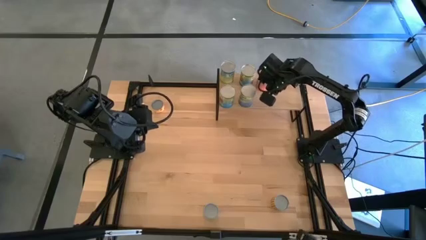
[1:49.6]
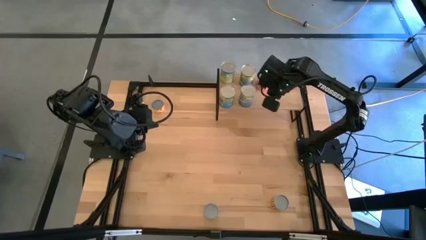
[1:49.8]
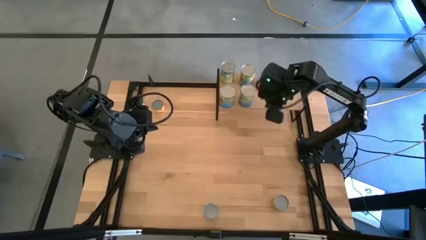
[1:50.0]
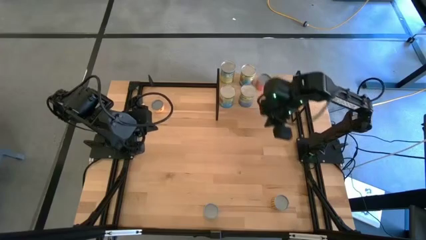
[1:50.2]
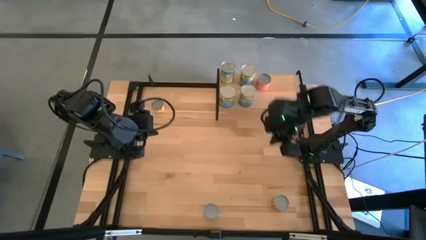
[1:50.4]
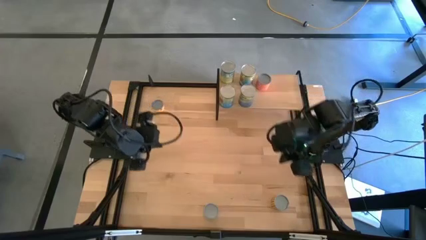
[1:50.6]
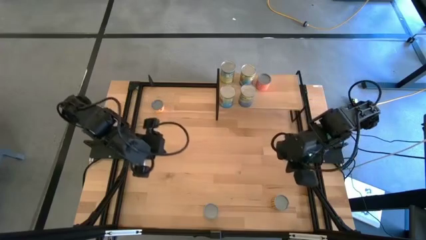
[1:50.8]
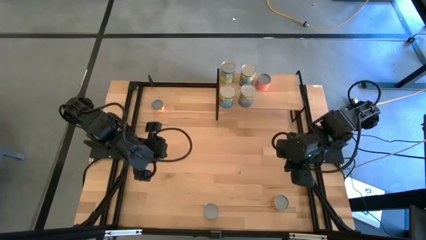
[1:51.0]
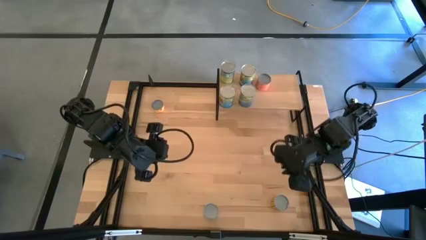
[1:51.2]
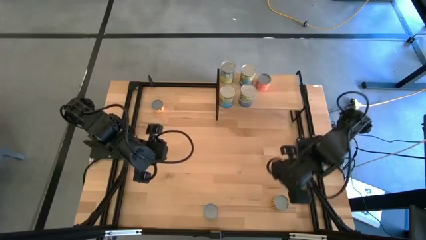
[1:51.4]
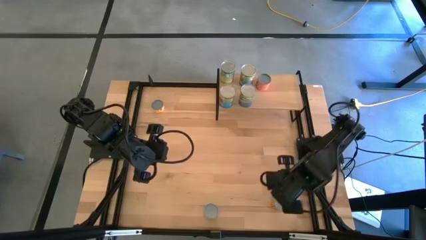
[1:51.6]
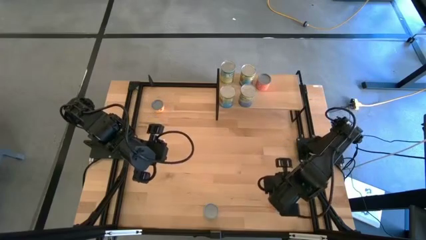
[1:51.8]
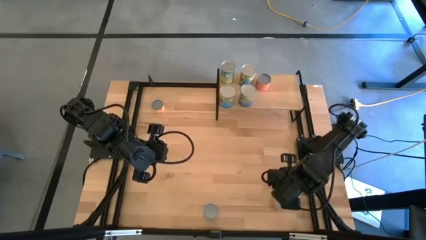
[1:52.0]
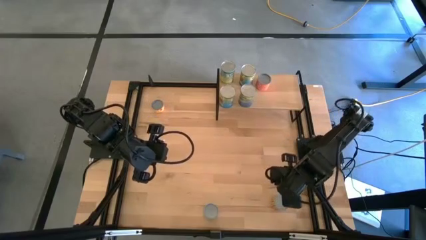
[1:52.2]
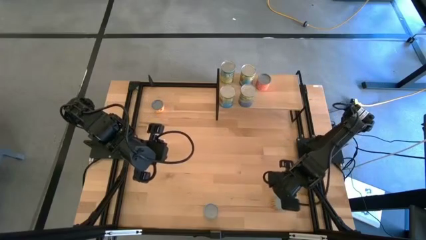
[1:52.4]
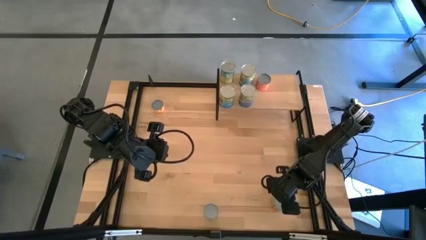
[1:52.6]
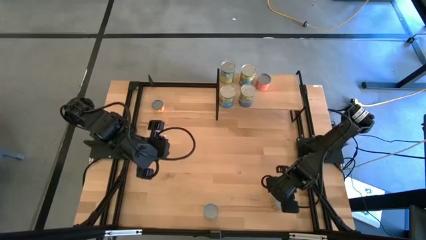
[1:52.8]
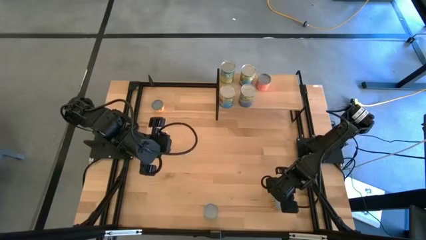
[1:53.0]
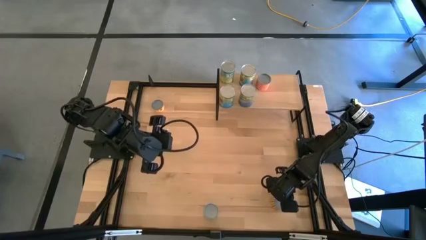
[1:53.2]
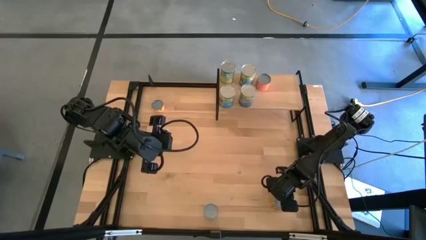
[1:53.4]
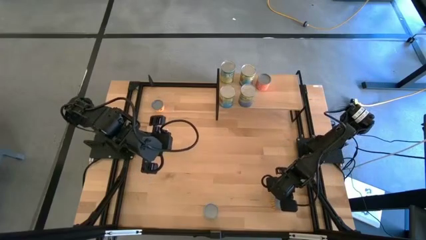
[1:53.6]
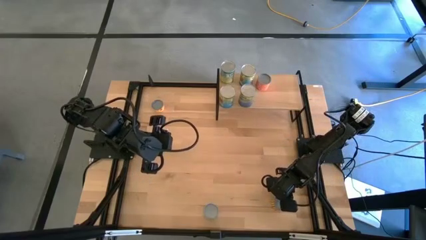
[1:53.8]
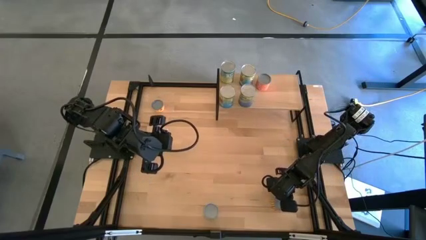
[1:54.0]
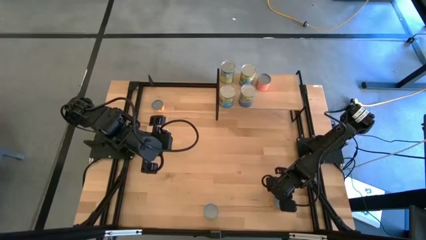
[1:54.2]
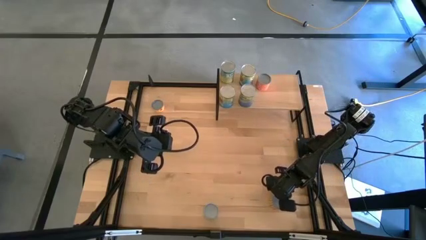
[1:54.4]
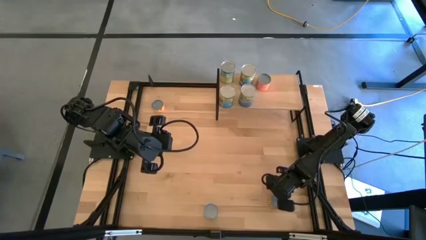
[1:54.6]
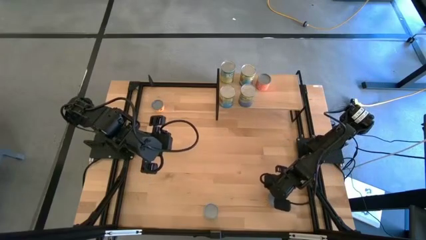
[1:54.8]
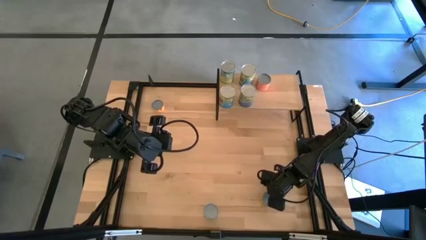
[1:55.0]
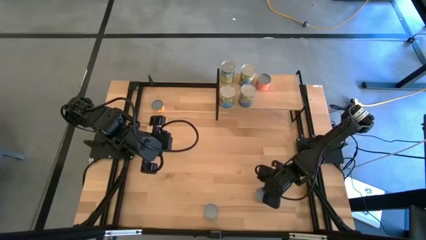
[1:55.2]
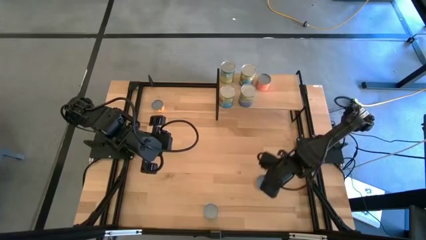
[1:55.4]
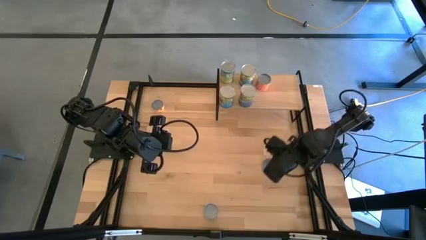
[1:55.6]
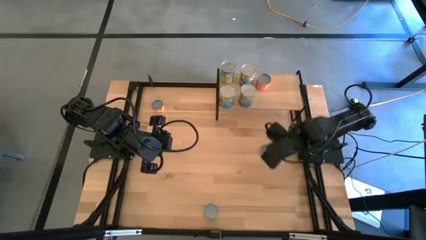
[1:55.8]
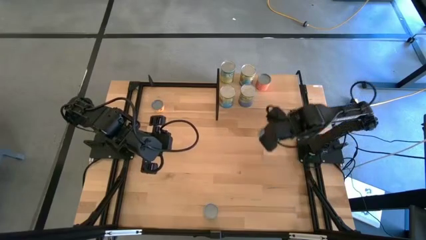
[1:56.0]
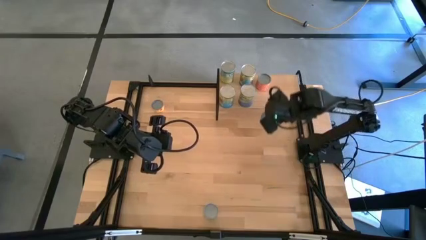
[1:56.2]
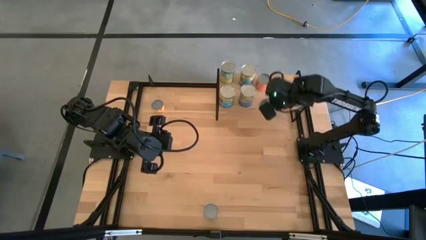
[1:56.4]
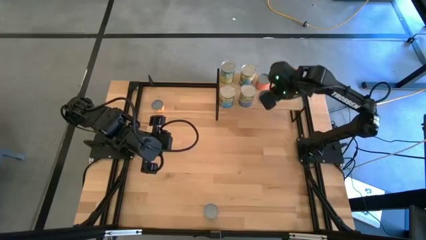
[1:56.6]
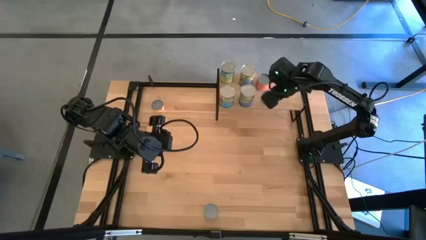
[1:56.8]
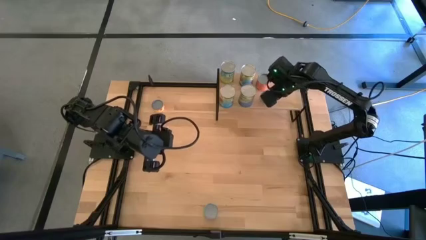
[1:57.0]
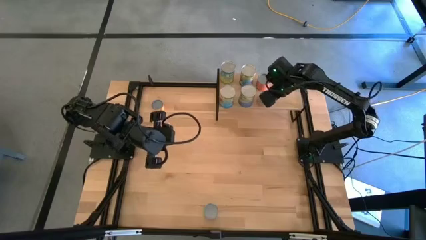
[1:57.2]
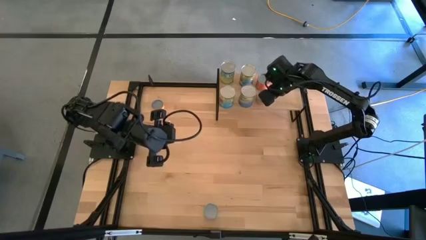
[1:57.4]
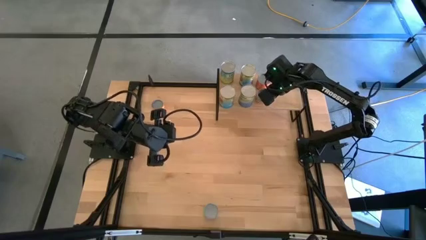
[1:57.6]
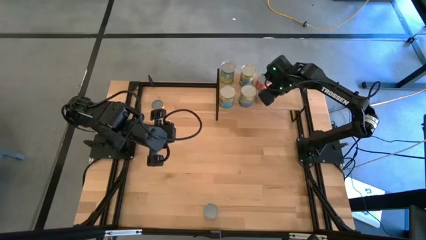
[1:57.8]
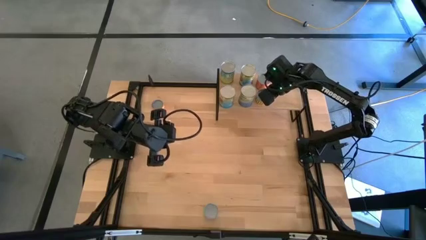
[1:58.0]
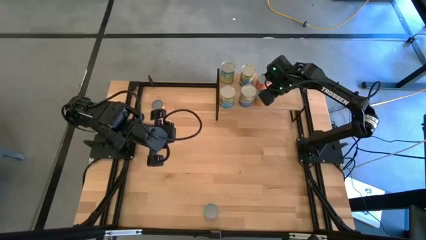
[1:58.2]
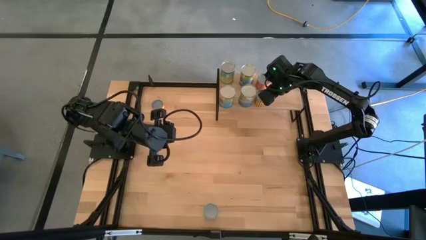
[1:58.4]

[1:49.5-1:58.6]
Task: Pick and place cans onto a shelf
Put the canned spicy black beans on the shelf

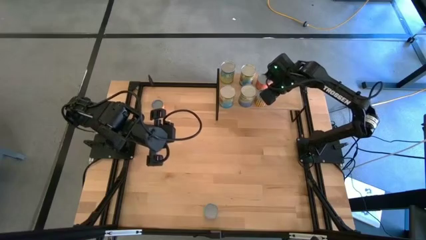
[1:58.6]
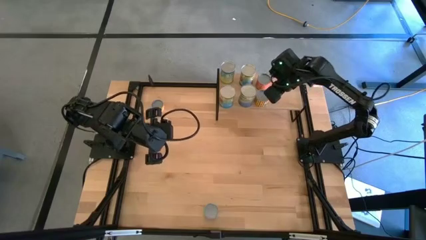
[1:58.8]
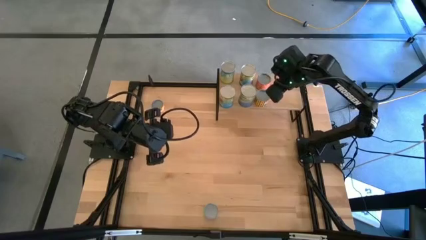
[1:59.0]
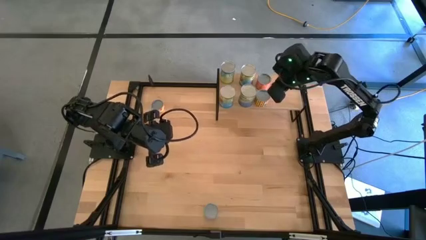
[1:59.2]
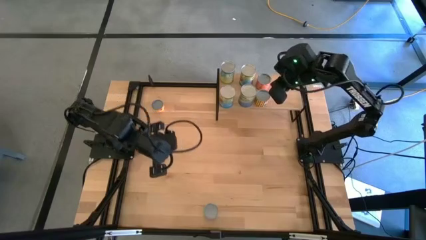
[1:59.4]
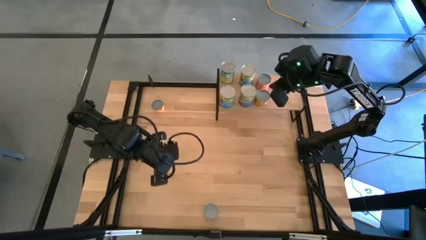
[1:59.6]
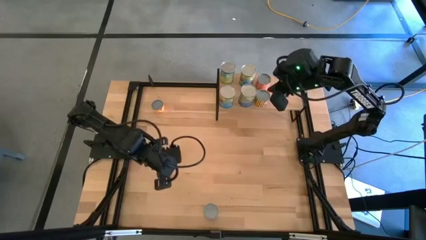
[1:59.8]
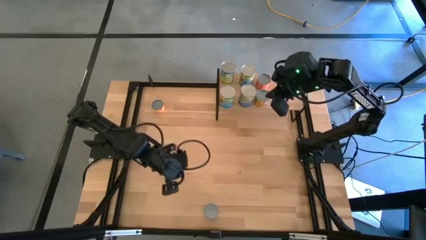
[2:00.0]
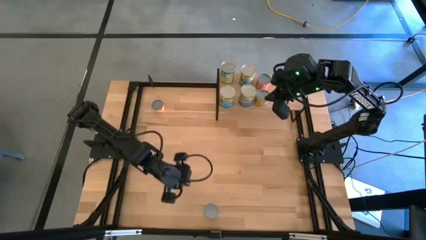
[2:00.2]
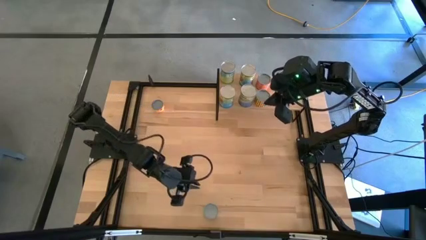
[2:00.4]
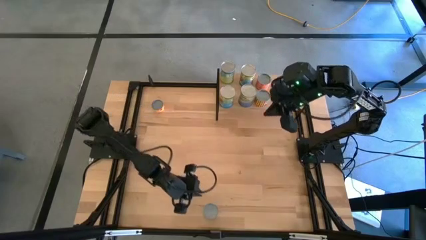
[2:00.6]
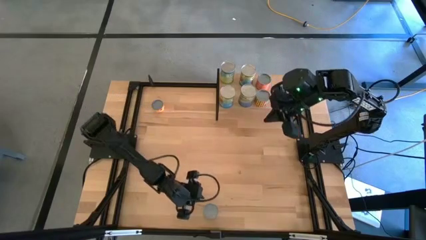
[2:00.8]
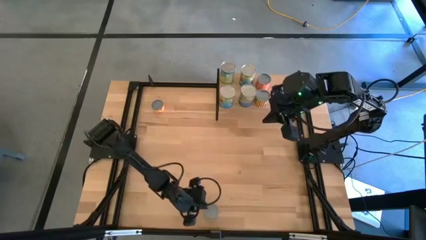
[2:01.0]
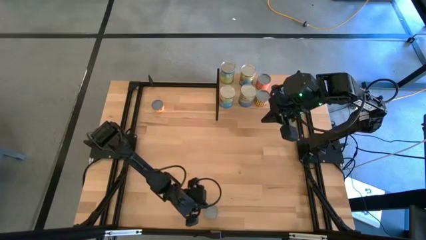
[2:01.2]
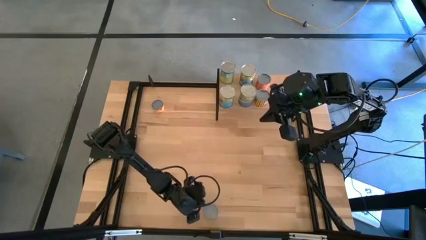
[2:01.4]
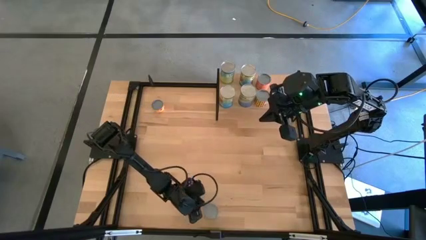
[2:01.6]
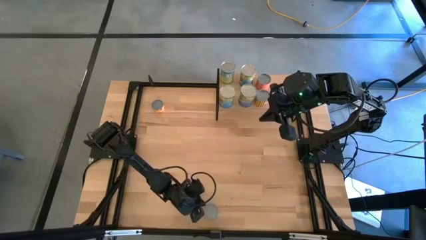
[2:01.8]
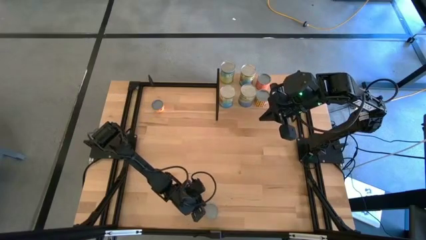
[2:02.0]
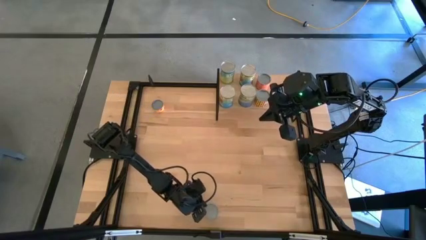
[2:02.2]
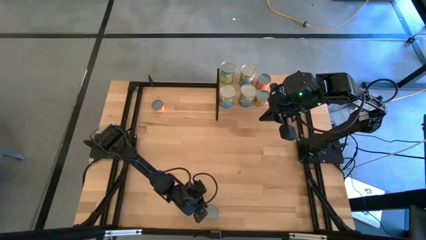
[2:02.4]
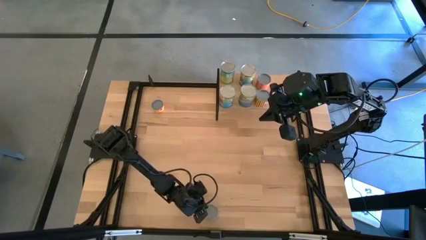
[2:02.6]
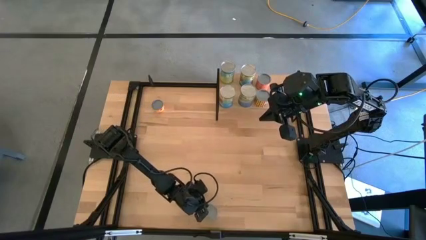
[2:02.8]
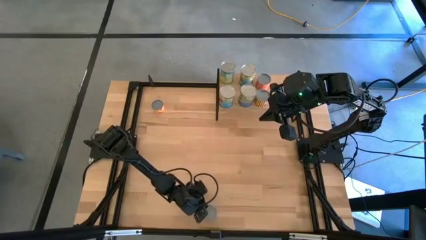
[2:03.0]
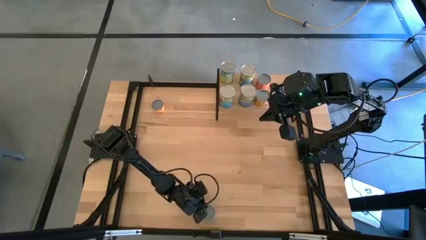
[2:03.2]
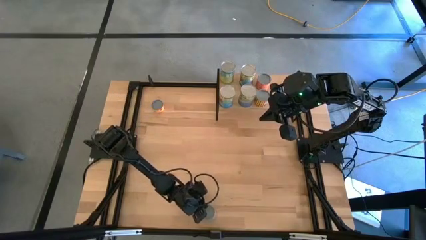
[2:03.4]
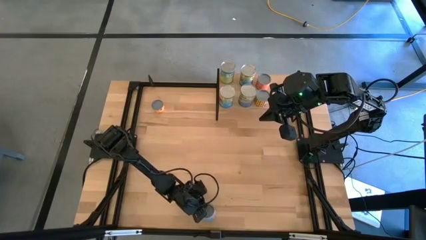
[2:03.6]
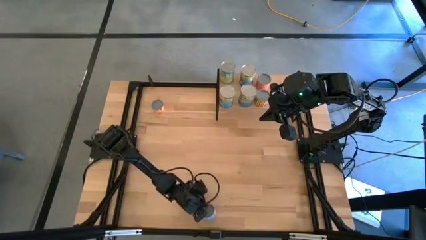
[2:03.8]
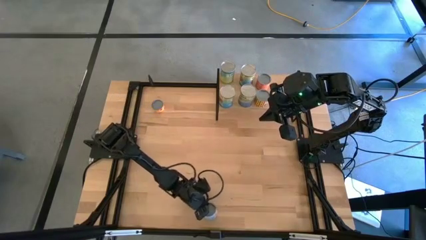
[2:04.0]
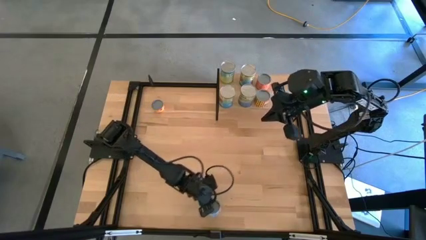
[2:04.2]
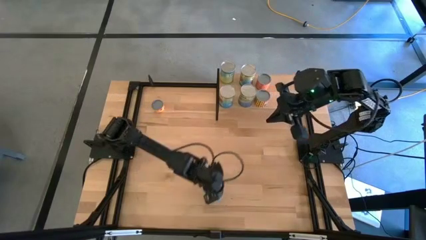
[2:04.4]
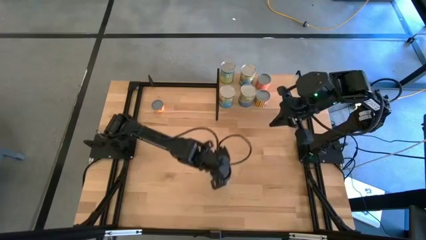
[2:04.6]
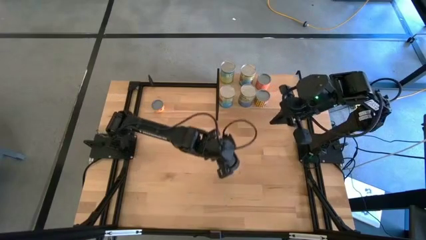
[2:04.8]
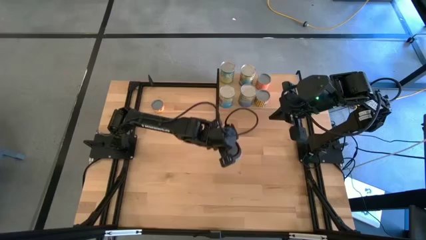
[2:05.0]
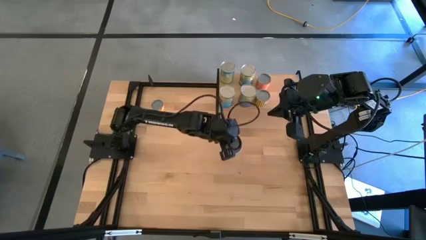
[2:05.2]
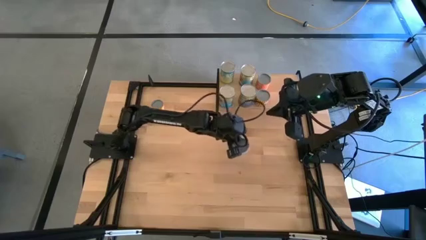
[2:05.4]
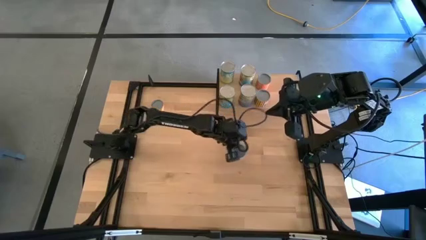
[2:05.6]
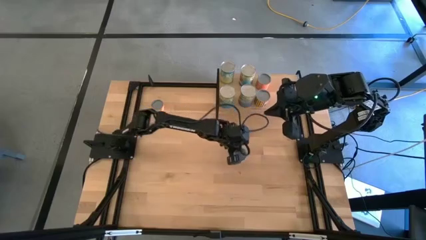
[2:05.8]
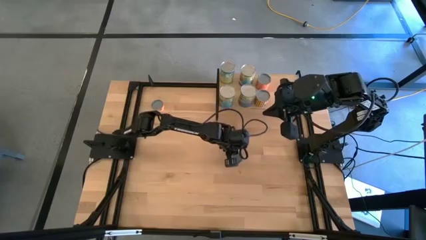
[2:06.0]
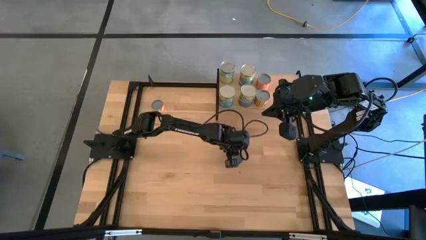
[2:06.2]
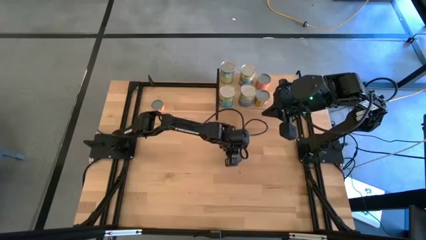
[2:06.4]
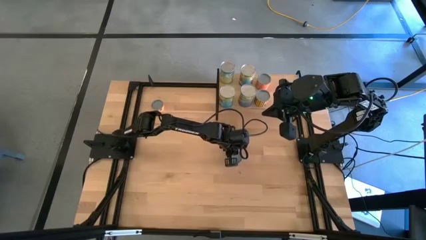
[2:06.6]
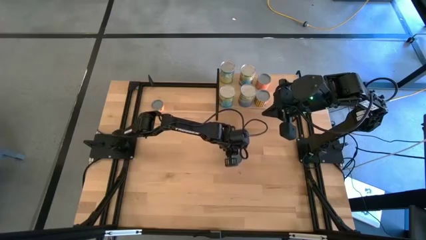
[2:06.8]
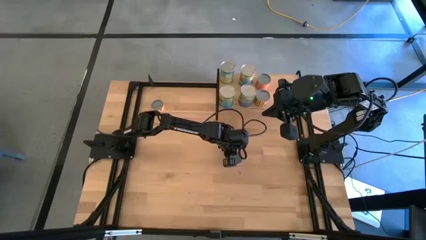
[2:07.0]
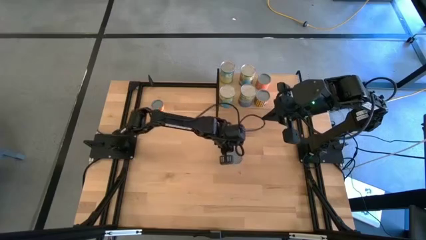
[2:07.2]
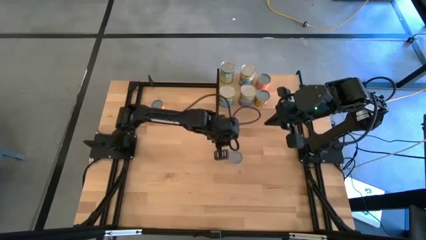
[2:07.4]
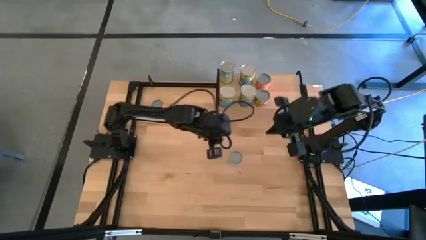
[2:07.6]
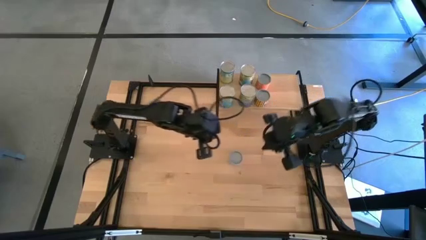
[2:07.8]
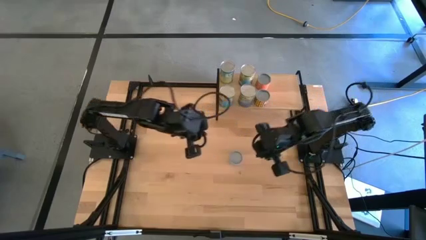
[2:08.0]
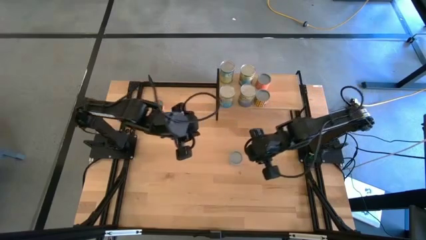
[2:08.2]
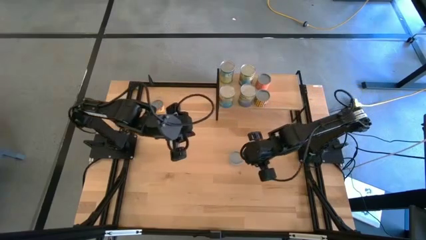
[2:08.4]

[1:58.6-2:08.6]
Put the canned tuna on the shelf
